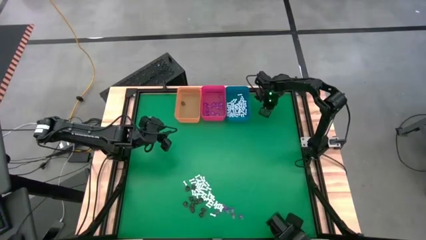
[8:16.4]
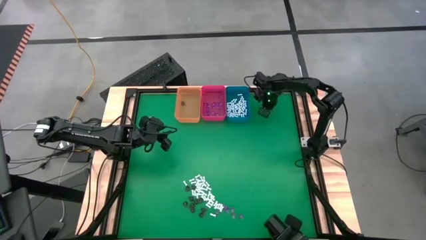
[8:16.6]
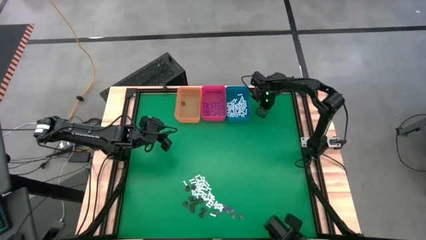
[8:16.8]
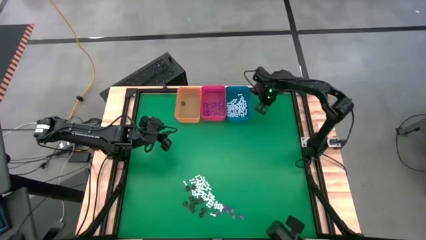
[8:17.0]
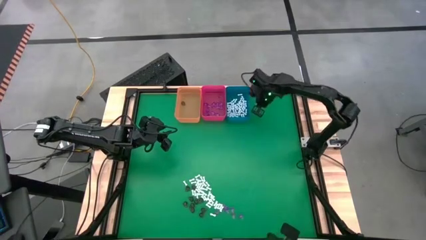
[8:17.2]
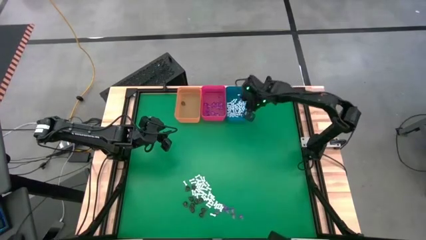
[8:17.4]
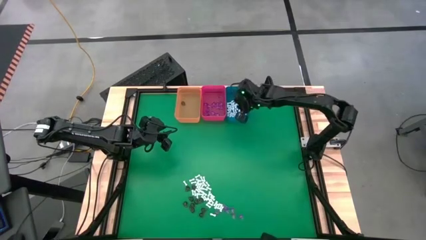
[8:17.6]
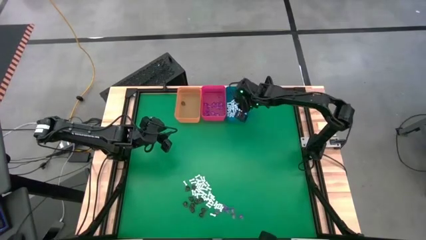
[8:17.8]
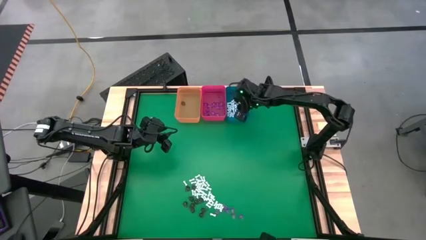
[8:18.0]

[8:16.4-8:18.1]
Task: Sort Halloween decoration
Put the white bone toy into the blue bin

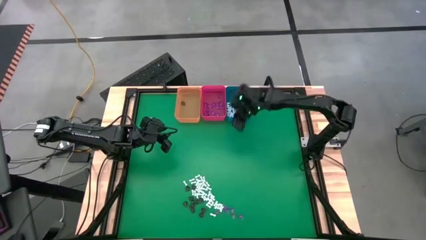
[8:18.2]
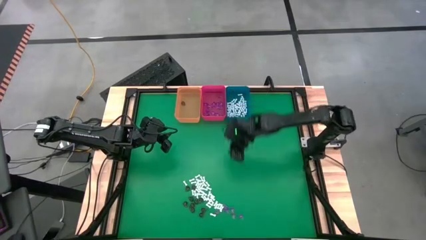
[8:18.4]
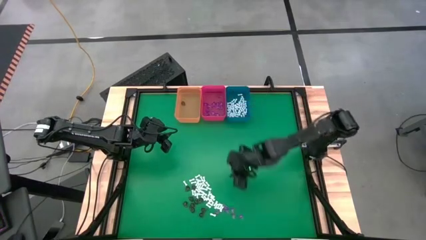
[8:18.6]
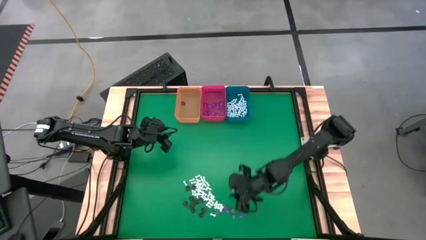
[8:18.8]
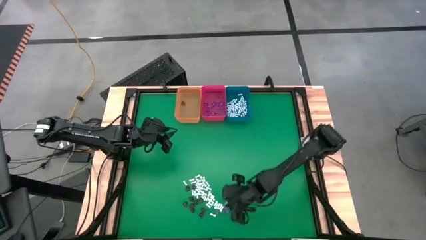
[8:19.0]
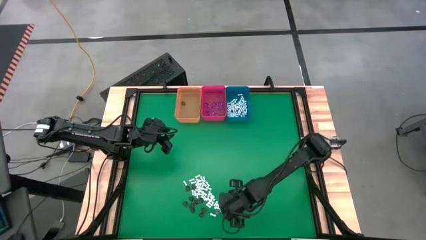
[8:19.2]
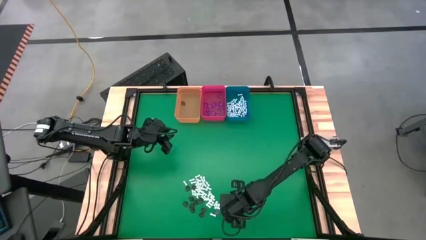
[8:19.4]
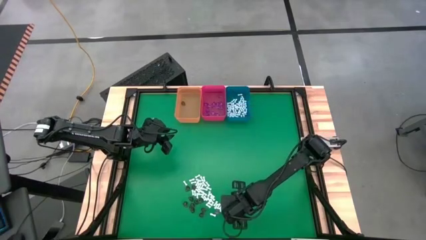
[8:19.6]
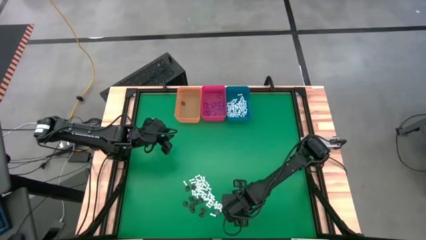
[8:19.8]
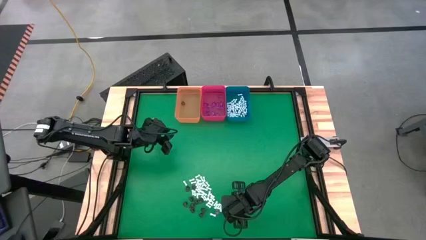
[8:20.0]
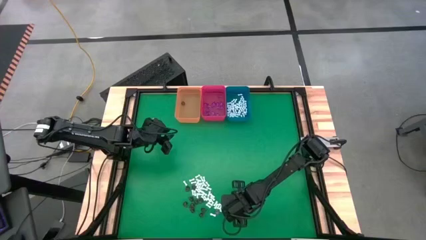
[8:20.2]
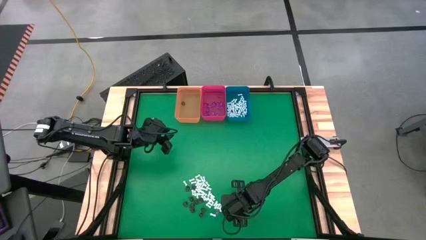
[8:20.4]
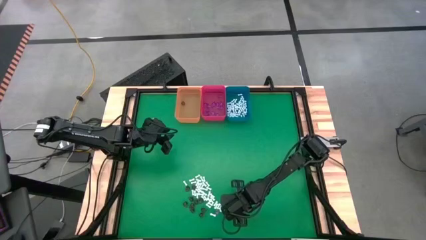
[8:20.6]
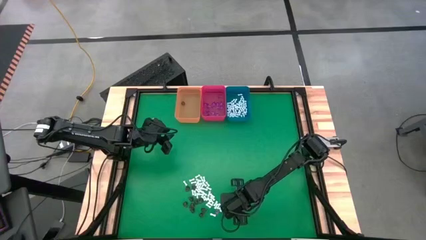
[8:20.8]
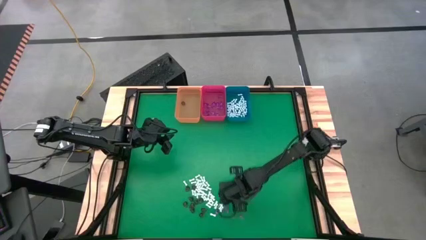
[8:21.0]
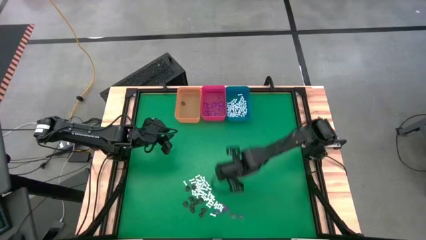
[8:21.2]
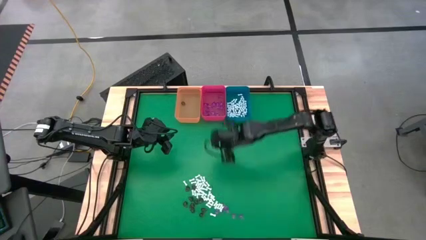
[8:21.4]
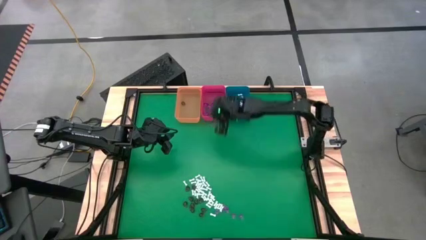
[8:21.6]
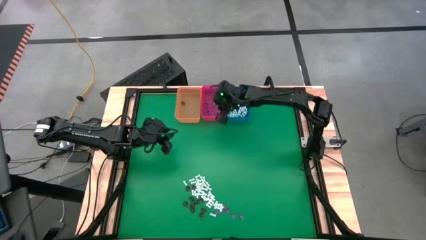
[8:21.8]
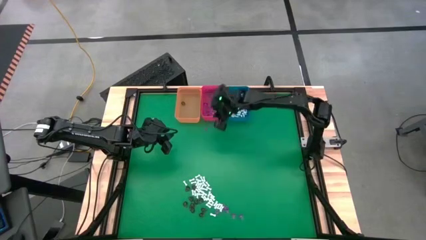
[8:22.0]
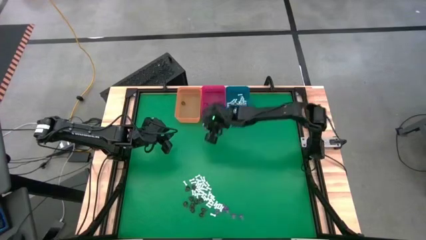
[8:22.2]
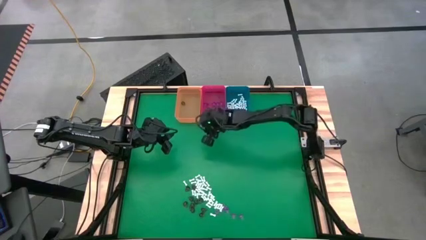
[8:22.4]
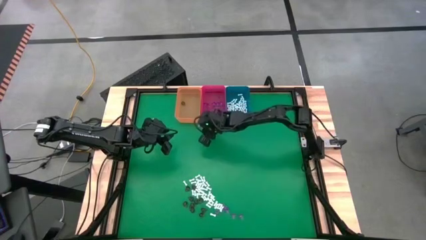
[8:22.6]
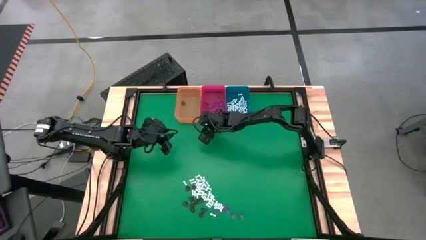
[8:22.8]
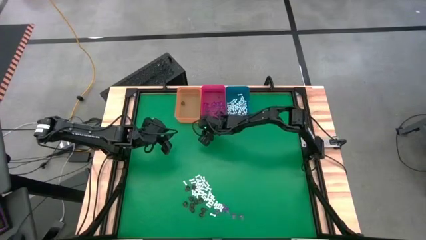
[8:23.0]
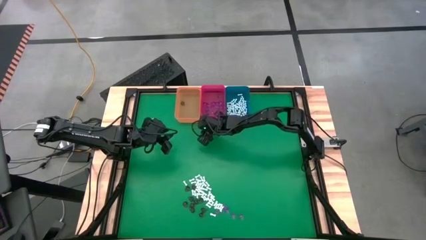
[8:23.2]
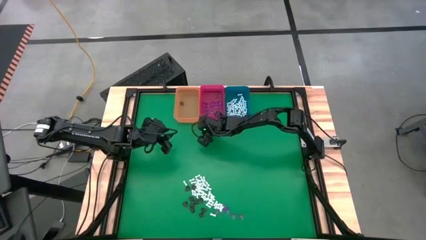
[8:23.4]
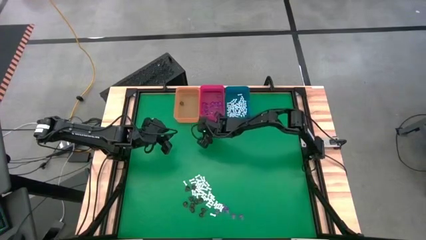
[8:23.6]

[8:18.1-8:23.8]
Put the violet witch hat toy into the red bin

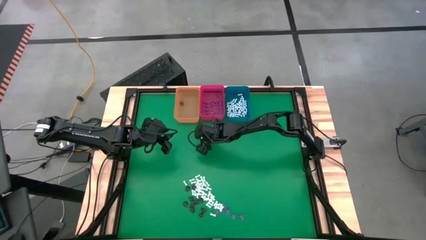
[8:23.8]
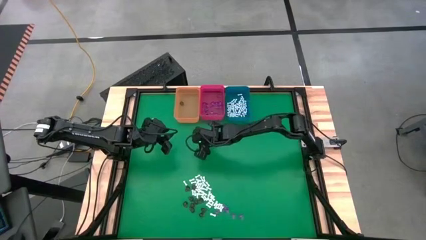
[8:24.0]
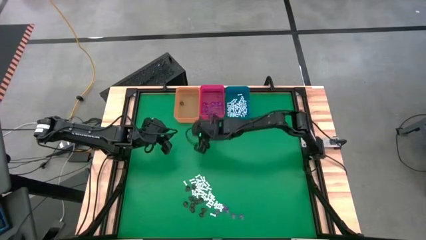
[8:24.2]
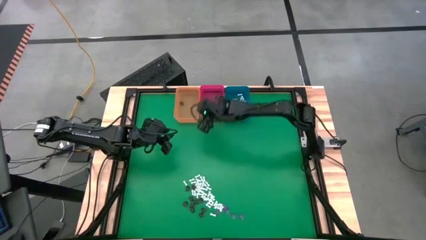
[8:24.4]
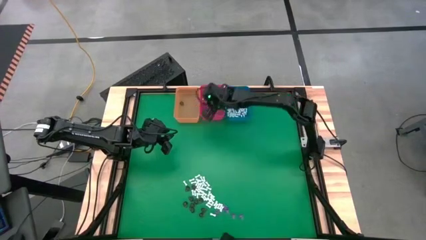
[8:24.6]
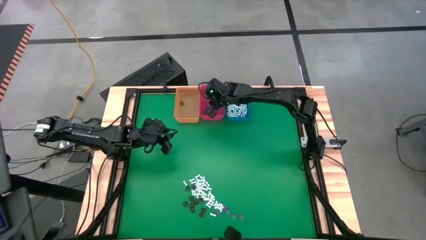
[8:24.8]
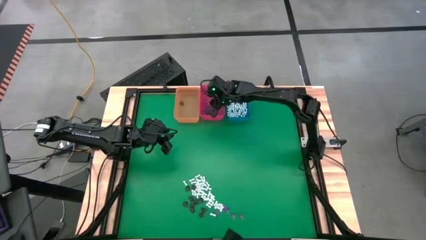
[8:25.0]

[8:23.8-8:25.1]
Put the violet witch hat toy into the red bin

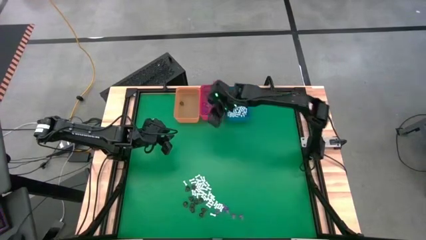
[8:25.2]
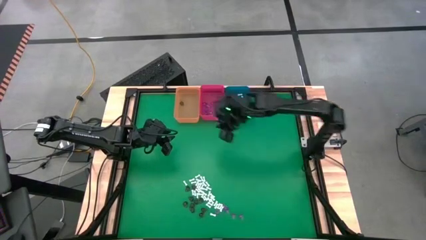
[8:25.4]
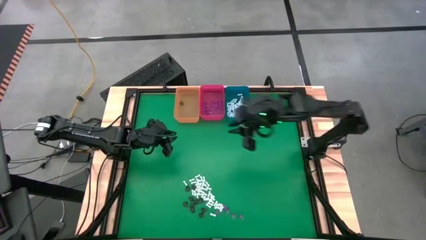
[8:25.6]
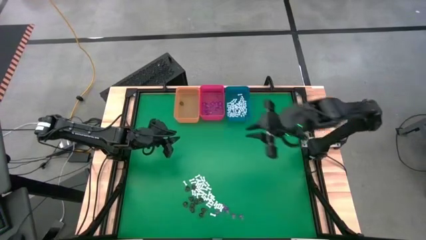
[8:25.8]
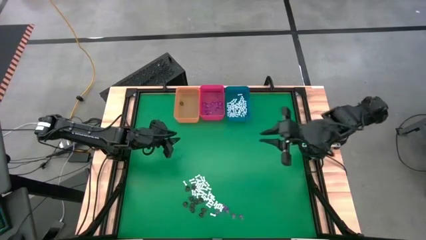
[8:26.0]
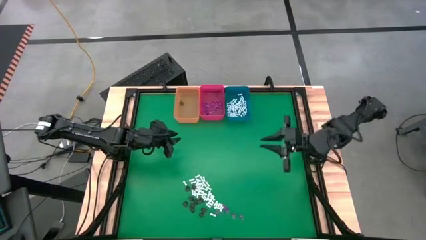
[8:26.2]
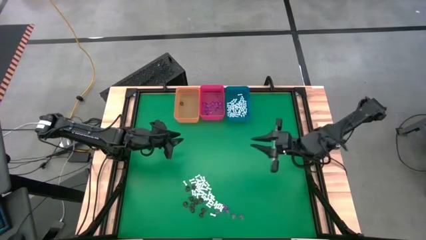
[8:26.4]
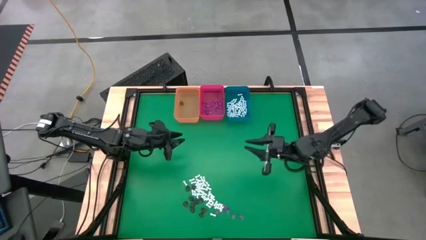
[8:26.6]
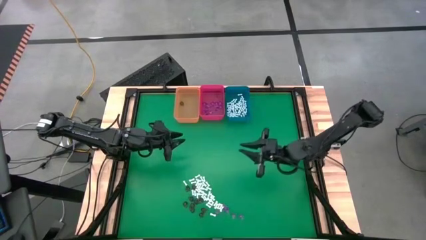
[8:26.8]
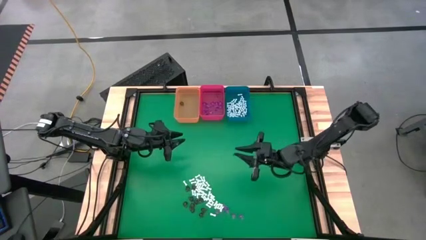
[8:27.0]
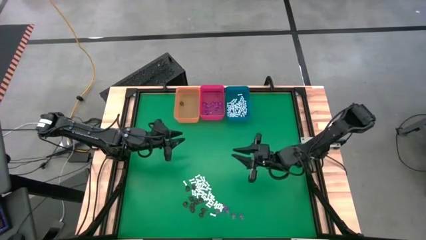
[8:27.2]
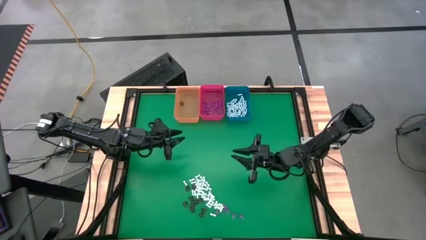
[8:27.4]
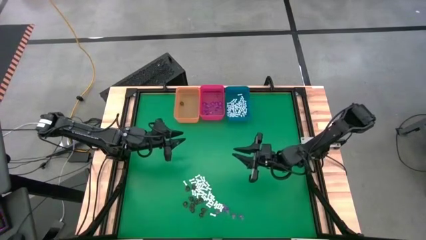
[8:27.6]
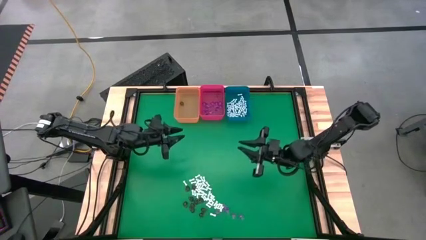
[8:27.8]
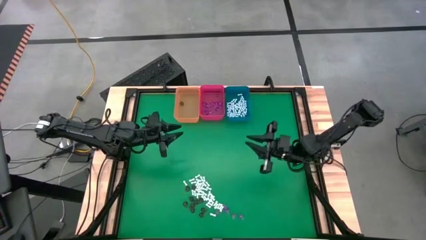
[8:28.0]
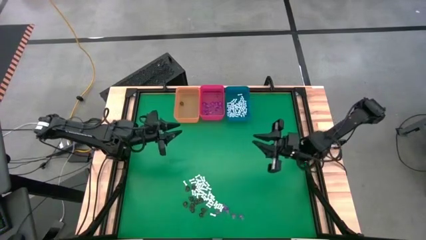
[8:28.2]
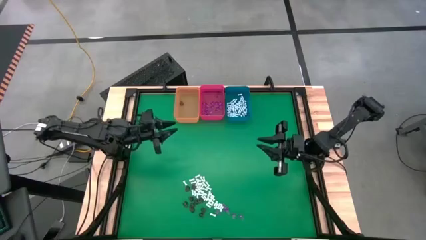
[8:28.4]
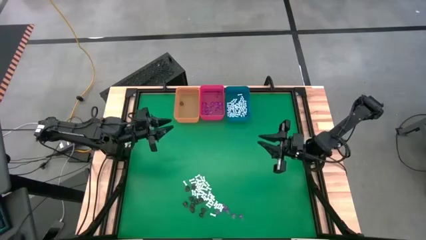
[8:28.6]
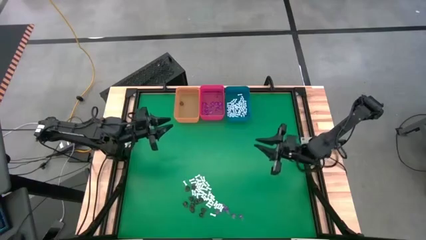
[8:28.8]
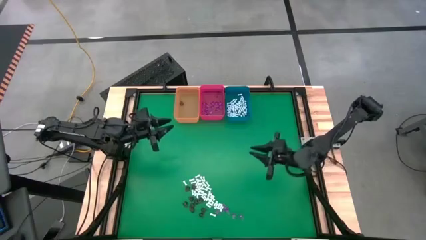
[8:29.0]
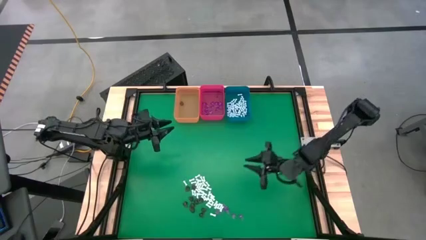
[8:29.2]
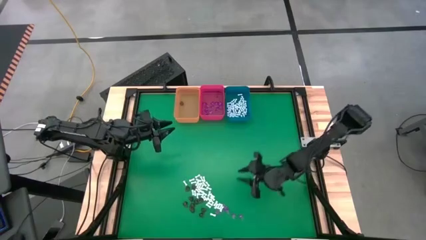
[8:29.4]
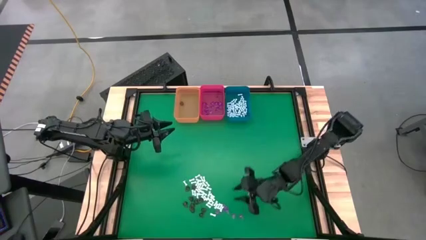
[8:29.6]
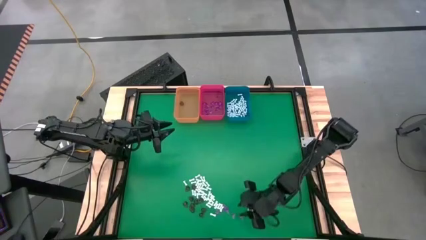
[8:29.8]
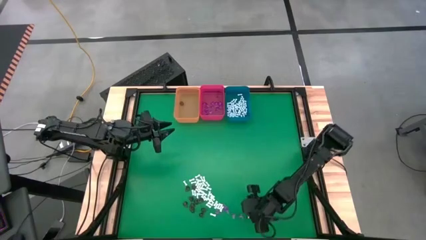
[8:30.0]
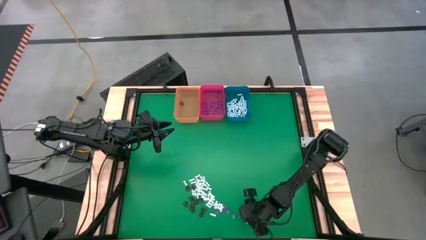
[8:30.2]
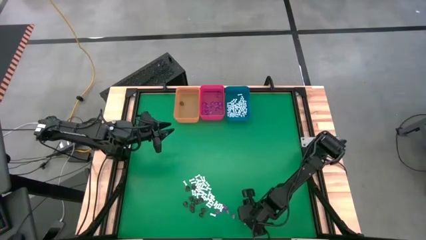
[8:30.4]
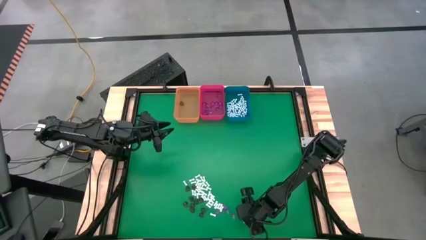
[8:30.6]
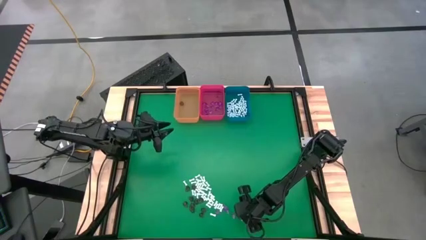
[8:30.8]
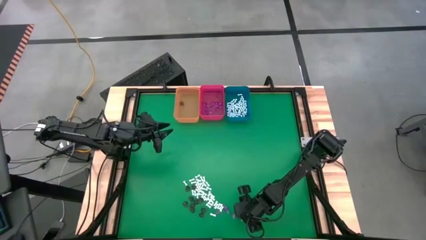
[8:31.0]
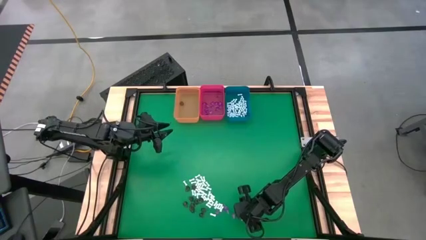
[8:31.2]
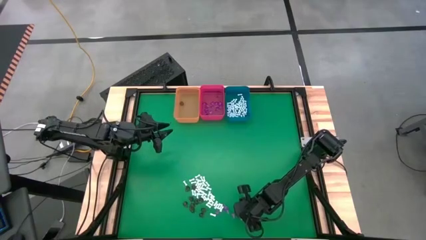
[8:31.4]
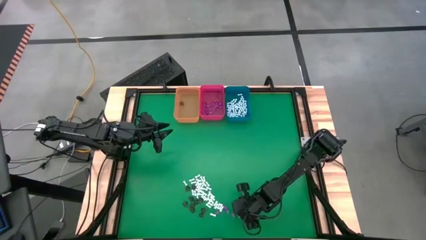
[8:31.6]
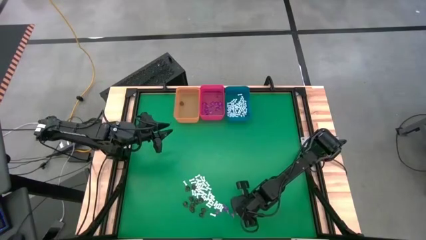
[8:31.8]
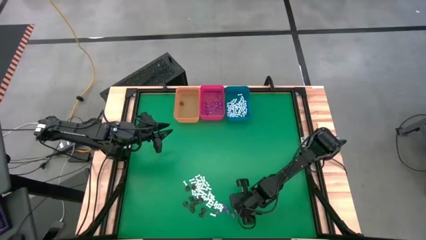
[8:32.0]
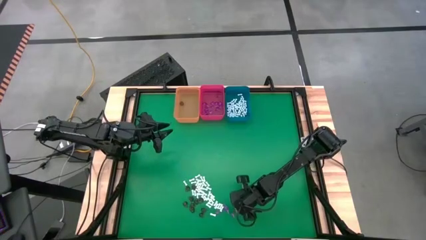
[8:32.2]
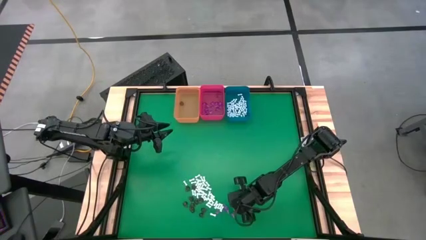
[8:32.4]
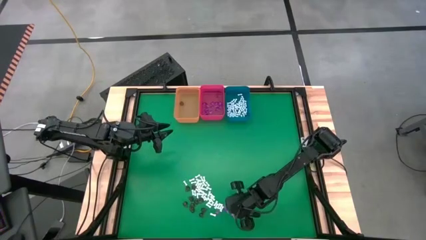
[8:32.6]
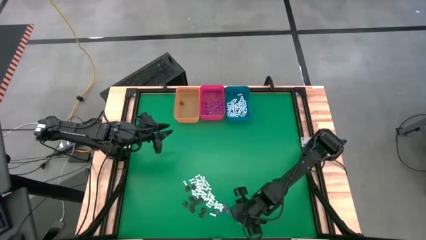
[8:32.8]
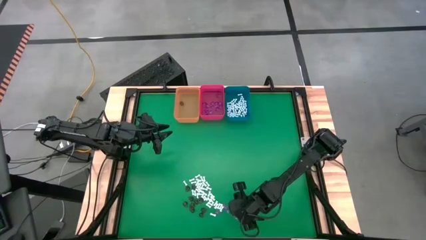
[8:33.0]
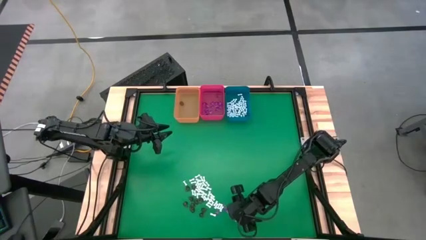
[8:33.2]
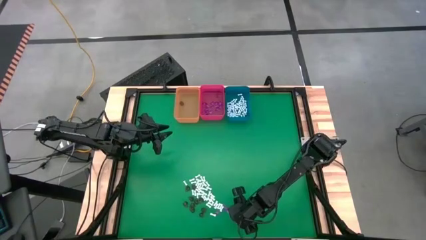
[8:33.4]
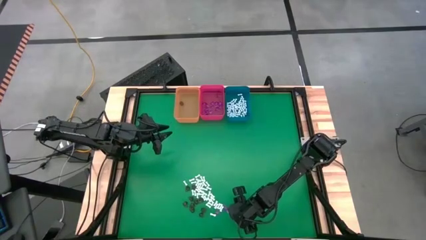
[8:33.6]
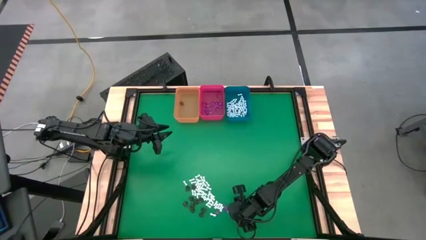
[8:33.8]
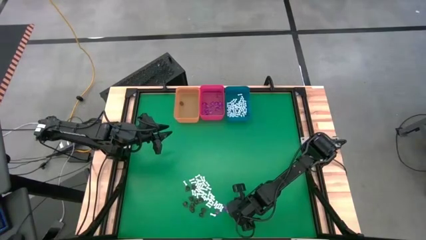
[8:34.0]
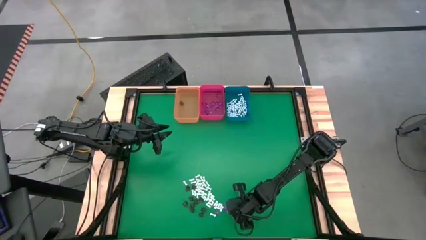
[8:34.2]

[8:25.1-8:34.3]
Put the violet witch hat toy into the red bin

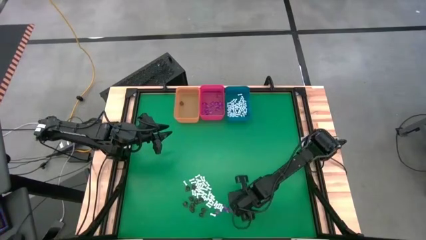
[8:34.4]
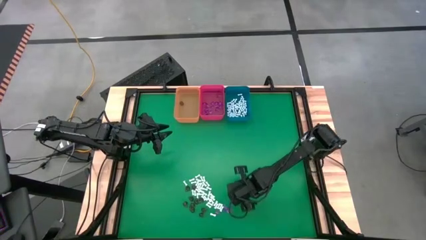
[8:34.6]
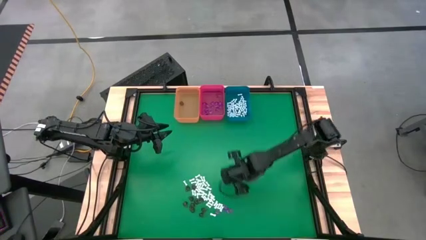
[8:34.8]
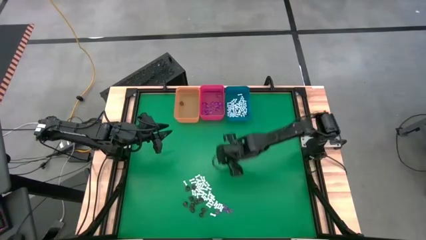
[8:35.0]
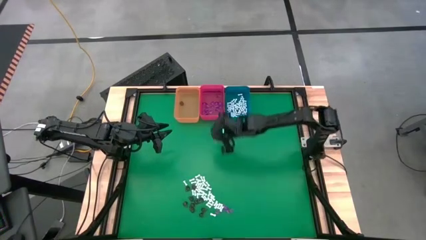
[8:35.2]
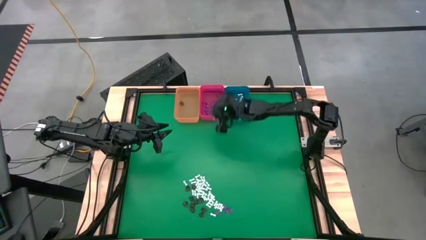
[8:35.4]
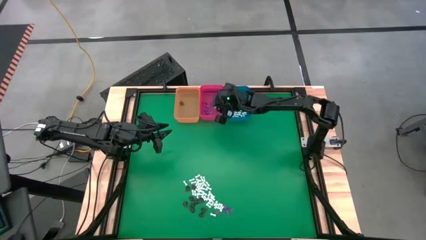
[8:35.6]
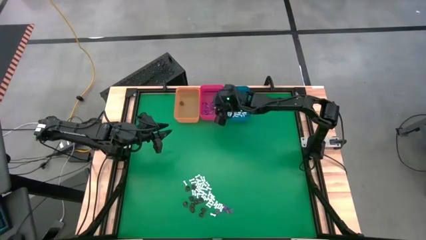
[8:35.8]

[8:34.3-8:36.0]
Put the violet witch hat toy into the red bin
